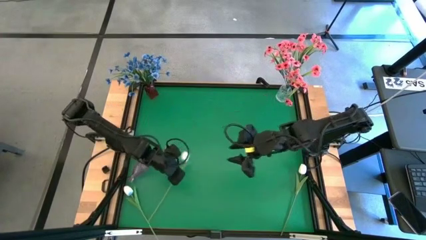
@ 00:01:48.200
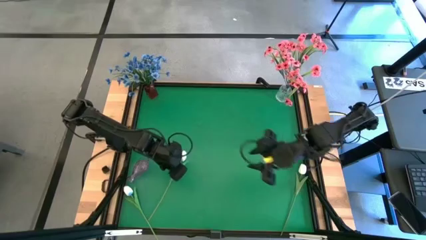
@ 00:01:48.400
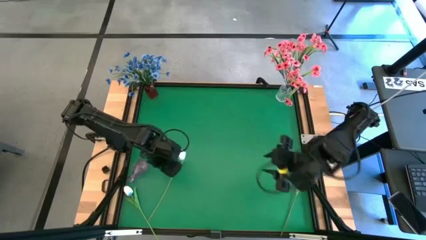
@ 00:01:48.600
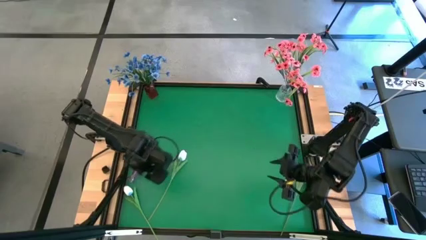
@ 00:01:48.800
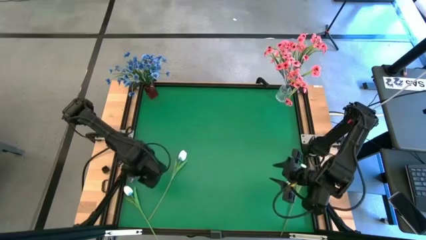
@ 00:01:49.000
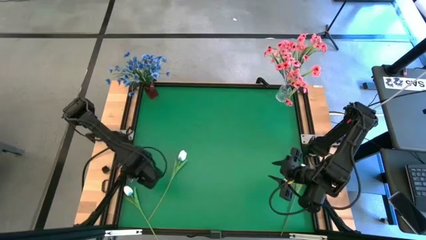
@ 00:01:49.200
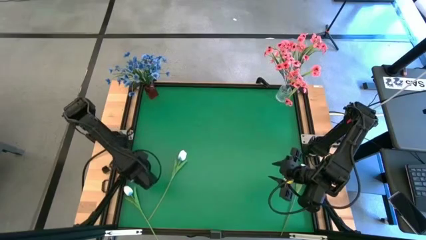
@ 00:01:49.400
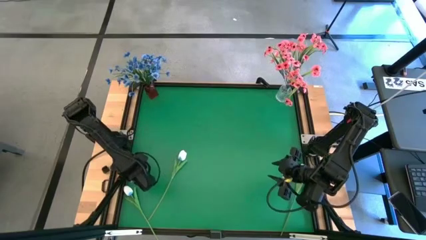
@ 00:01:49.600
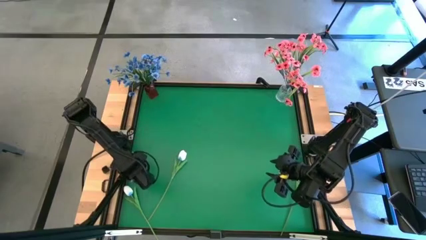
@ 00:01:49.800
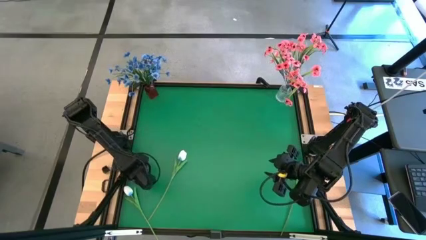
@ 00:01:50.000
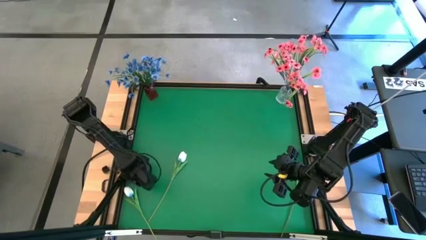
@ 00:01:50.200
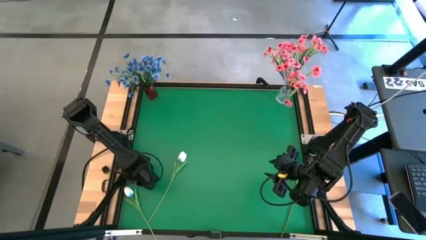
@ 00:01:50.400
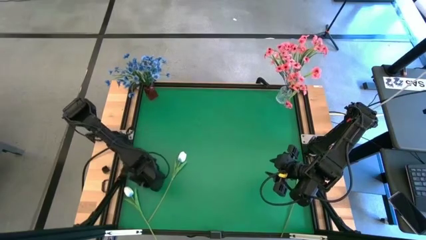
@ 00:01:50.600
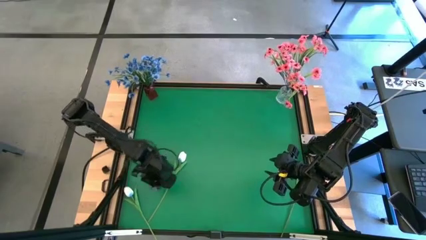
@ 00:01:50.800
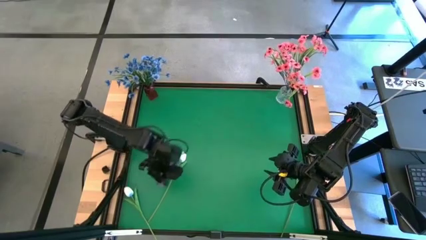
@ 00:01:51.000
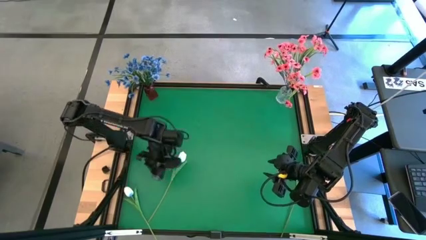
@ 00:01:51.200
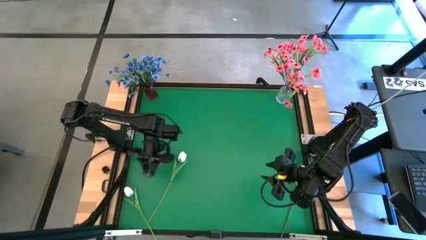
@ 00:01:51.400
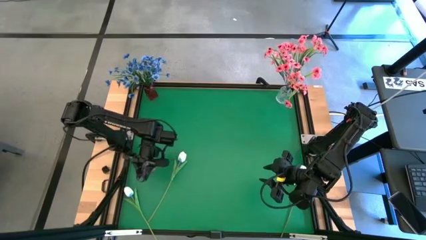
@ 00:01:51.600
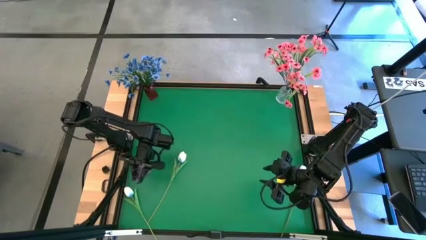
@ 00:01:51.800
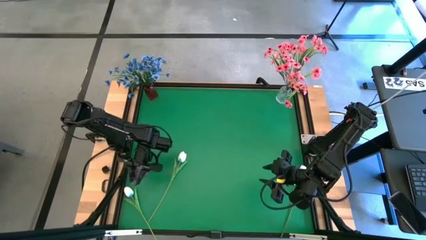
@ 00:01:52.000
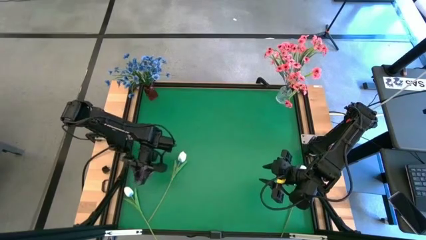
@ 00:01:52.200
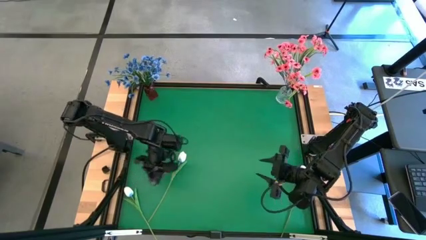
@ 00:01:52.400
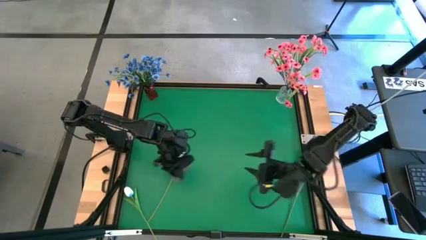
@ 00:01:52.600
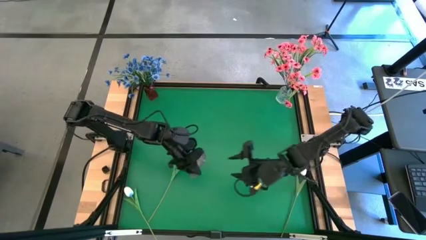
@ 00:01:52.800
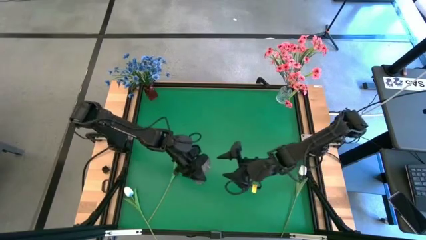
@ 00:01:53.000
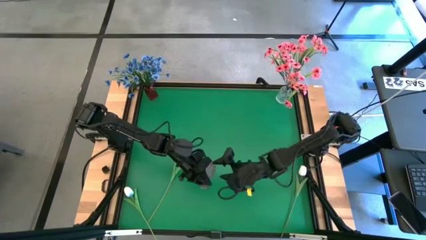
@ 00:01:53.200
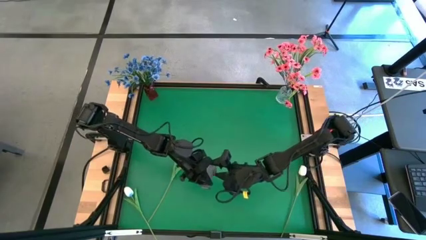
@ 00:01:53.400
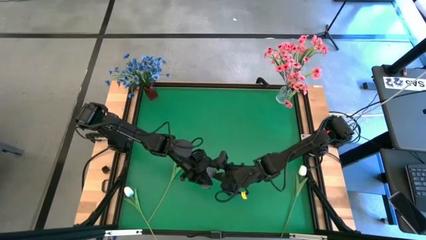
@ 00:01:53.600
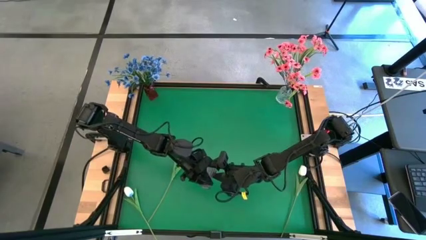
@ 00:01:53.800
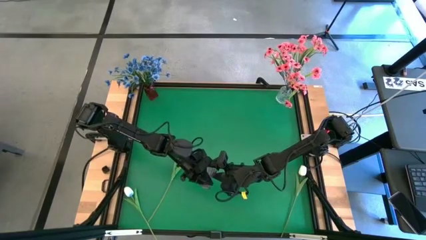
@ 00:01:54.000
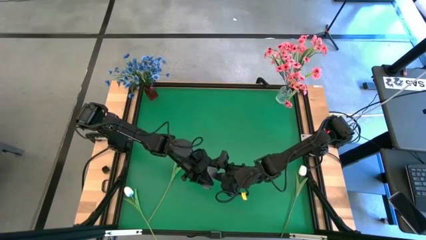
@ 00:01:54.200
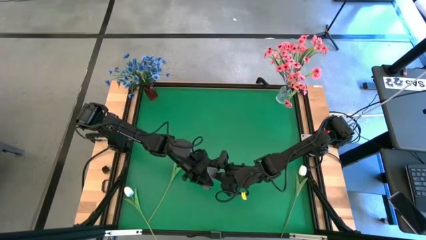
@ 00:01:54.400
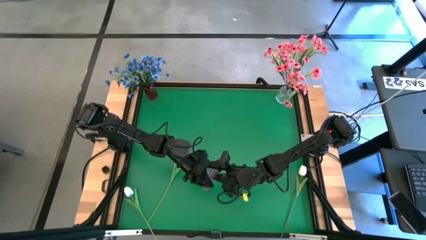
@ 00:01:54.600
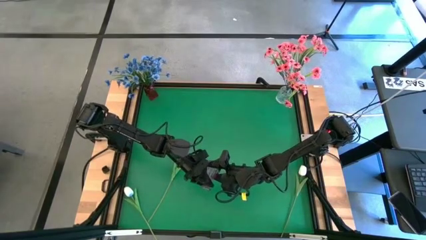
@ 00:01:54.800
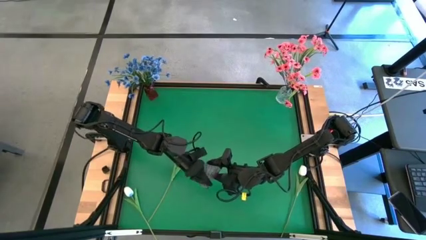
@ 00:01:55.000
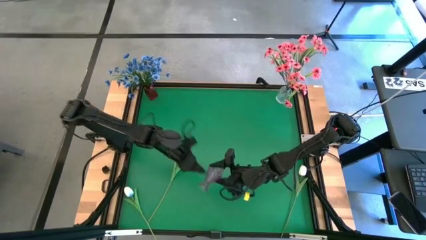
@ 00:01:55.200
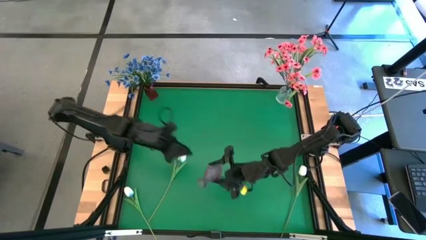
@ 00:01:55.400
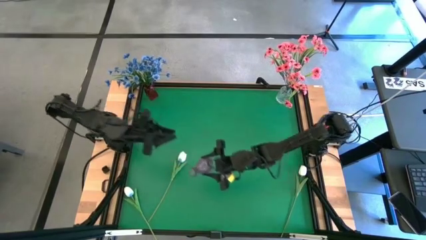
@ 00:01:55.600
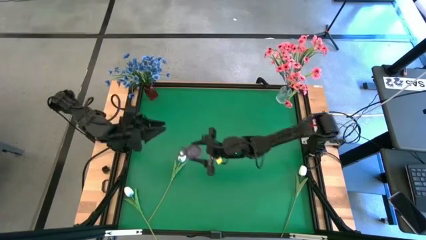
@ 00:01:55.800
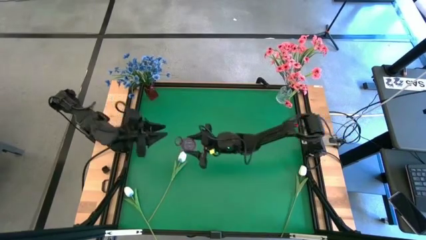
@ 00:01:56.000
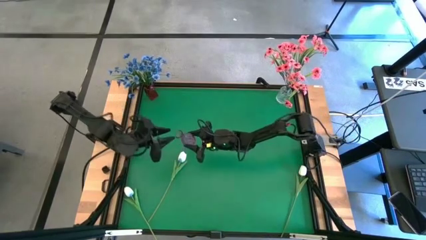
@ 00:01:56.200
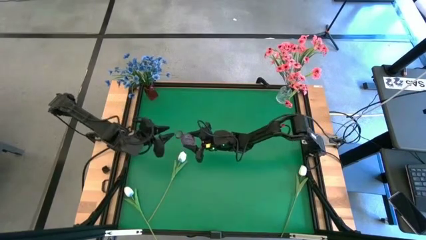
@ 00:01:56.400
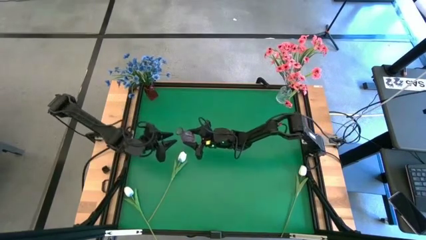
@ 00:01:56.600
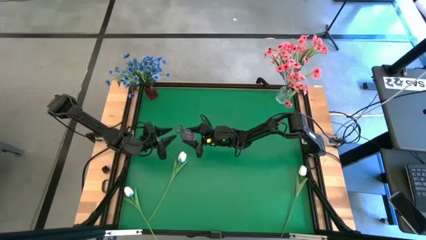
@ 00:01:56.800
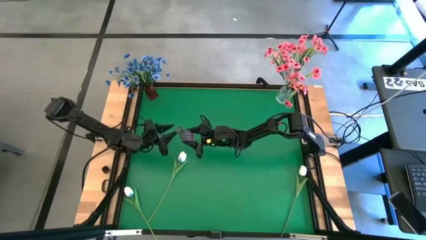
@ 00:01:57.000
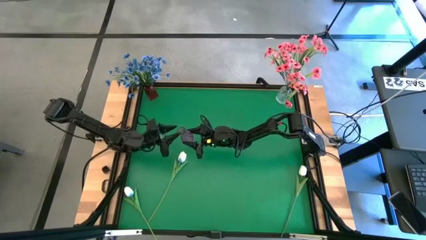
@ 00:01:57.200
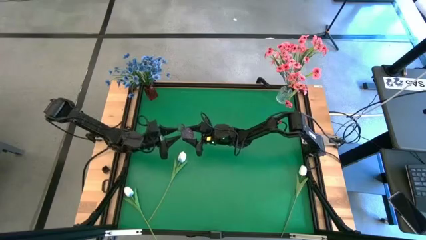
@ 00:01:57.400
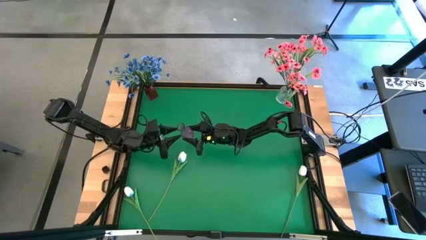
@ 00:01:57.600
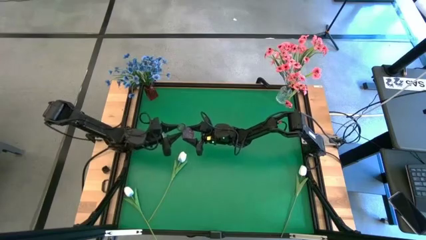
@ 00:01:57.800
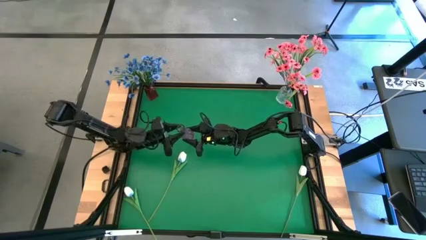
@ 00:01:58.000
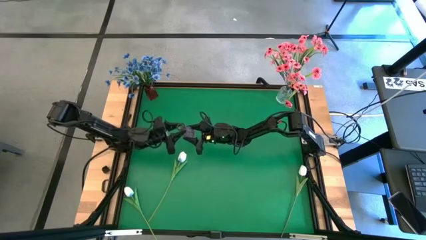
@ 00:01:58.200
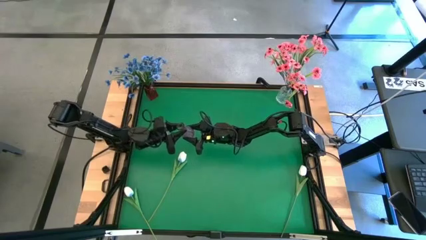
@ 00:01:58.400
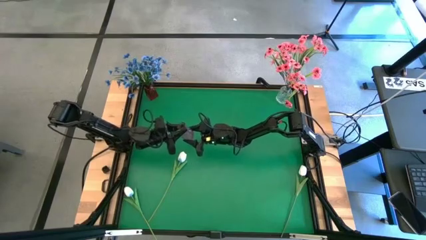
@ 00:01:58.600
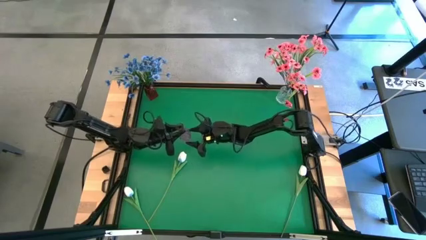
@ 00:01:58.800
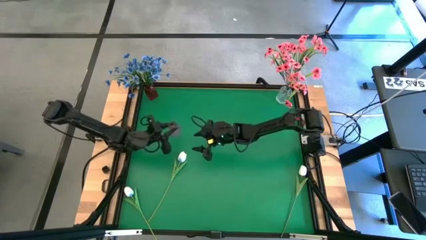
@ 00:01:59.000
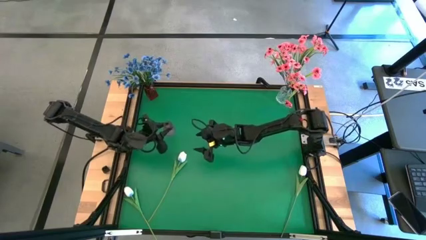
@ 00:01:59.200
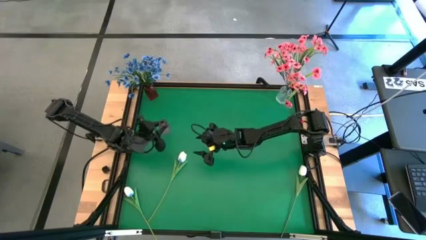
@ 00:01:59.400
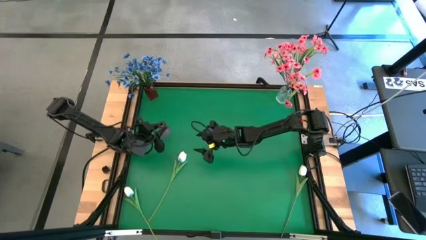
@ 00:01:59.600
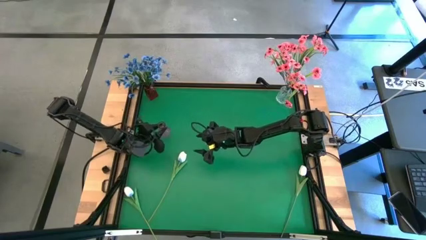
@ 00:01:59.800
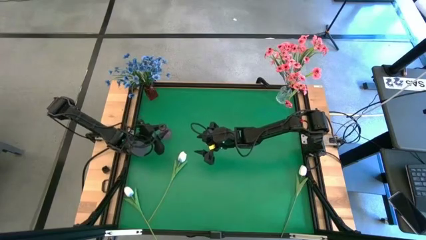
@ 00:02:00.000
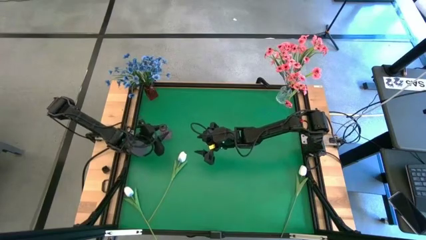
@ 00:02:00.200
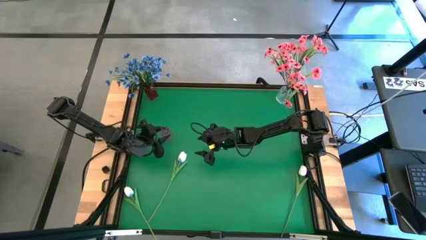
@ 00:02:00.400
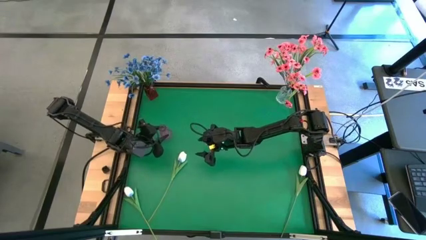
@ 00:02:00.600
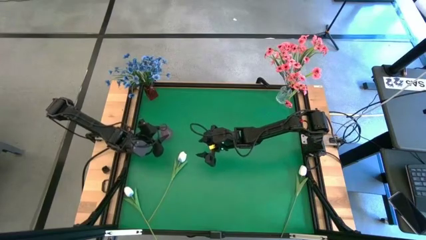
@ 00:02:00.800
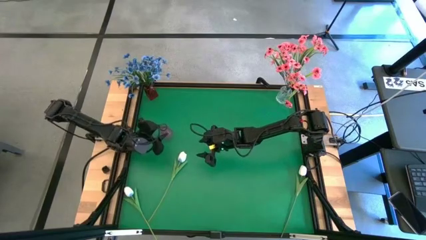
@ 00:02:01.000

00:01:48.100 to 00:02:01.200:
Task: Sort flowers into vase by color
Adjust the purple vase

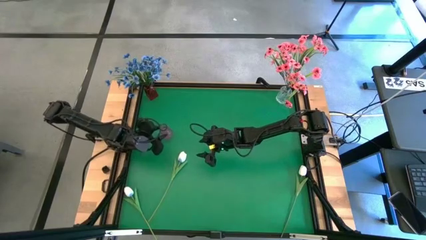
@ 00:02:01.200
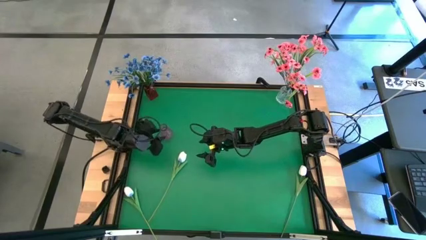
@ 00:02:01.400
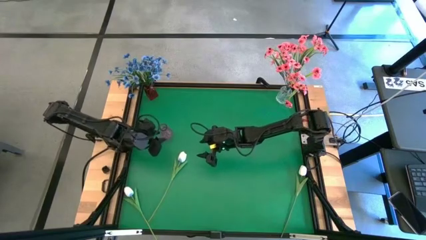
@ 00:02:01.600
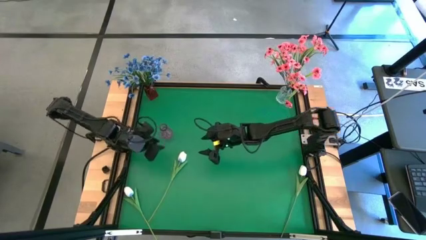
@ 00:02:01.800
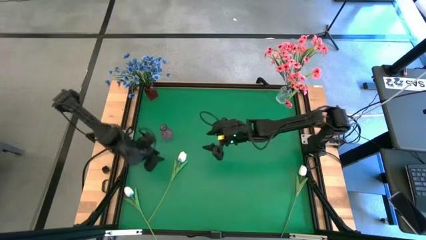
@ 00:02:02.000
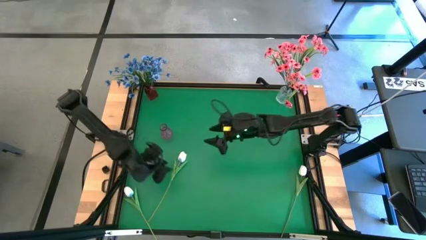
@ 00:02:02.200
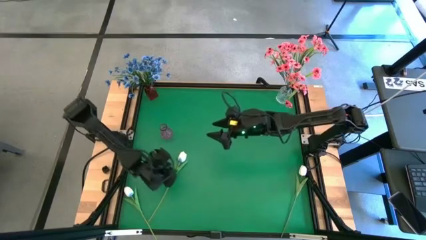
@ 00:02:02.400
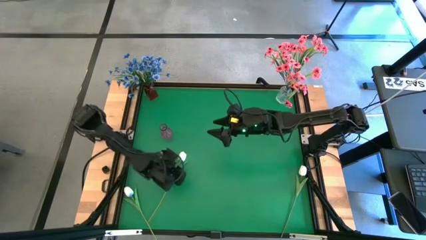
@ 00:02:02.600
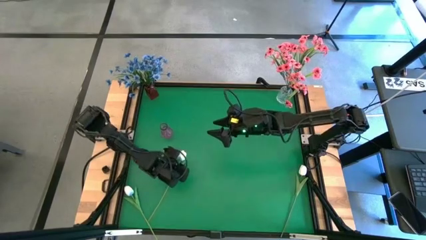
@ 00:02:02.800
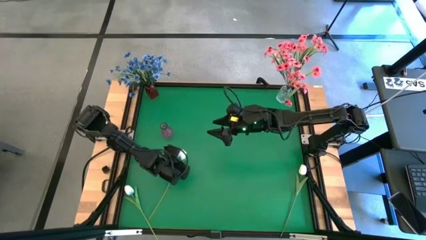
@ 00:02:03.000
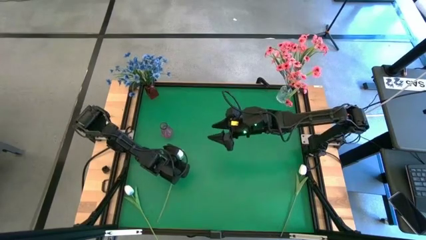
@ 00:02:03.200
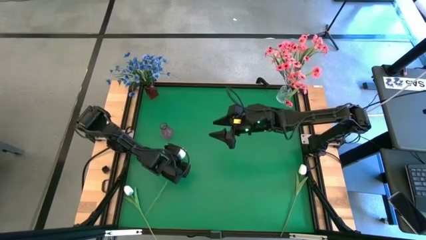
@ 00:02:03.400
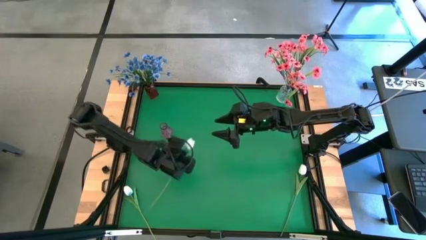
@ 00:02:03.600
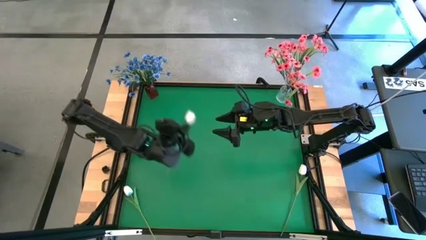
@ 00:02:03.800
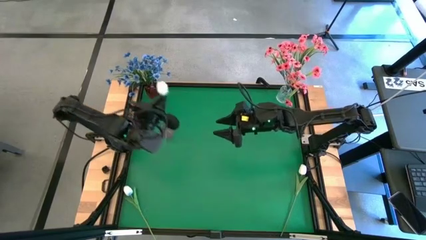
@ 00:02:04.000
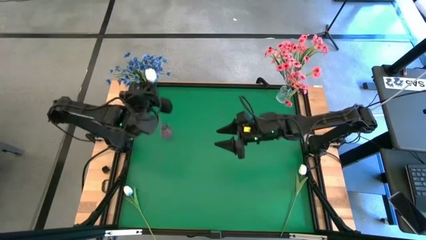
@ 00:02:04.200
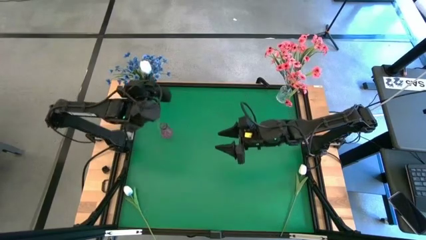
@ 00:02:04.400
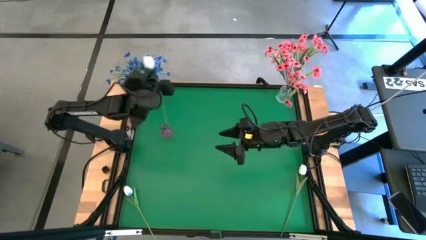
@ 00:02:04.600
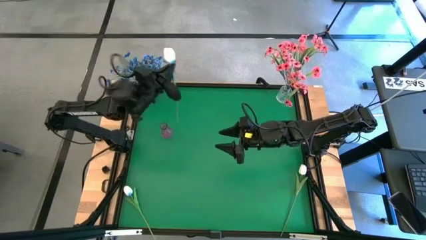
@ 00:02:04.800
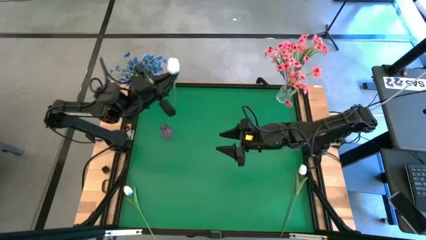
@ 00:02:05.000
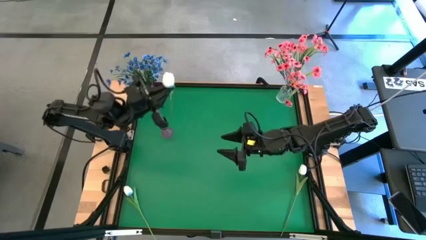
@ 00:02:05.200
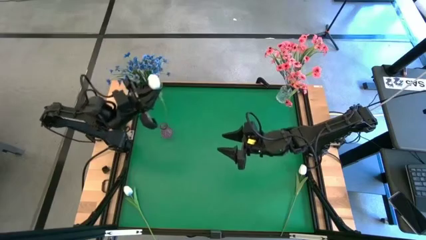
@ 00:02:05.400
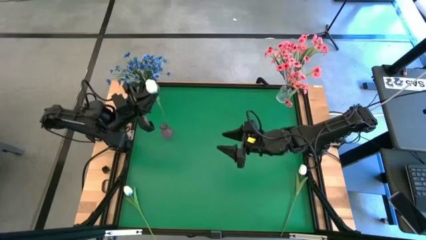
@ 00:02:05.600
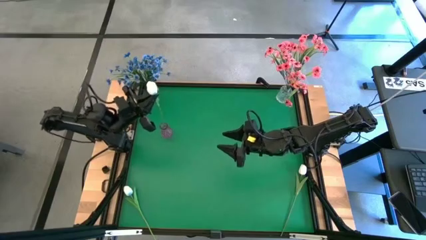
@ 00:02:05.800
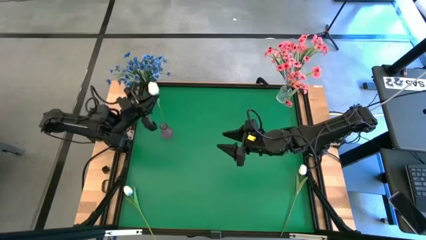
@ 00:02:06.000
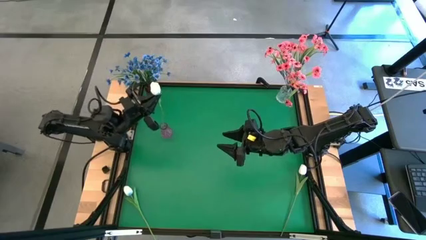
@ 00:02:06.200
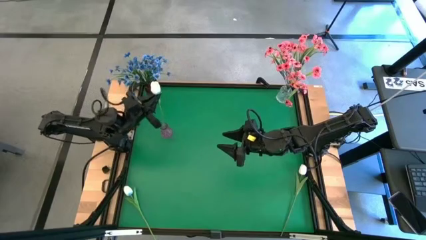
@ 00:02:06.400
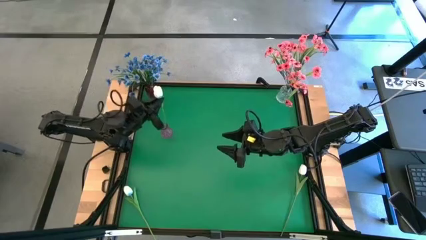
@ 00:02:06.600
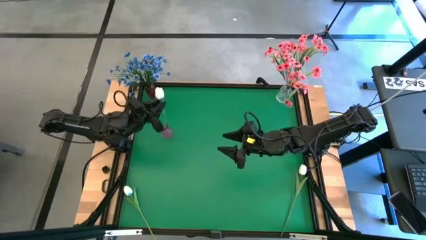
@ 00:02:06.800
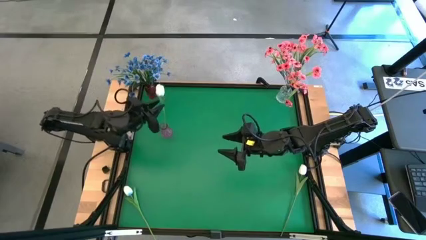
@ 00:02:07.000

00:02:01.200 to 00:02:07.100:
Put the top white tulip into the purple vase
